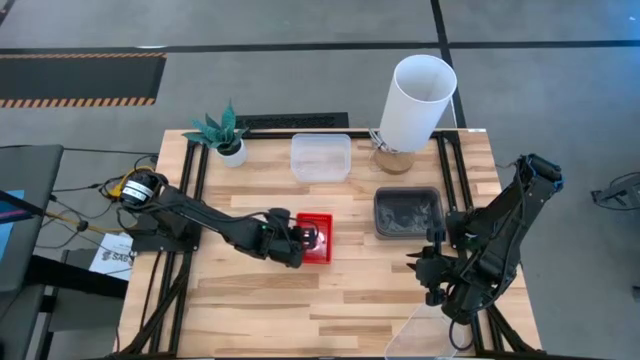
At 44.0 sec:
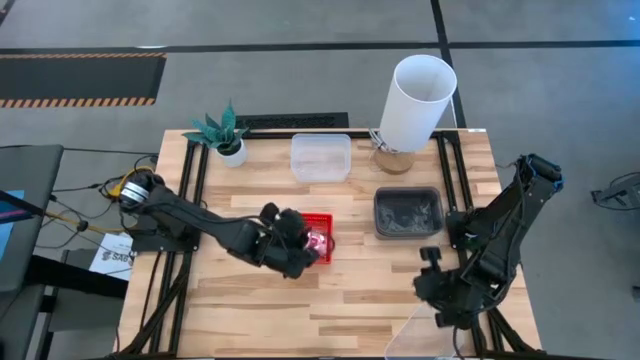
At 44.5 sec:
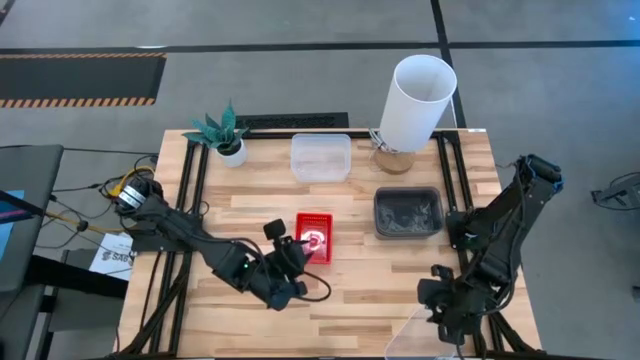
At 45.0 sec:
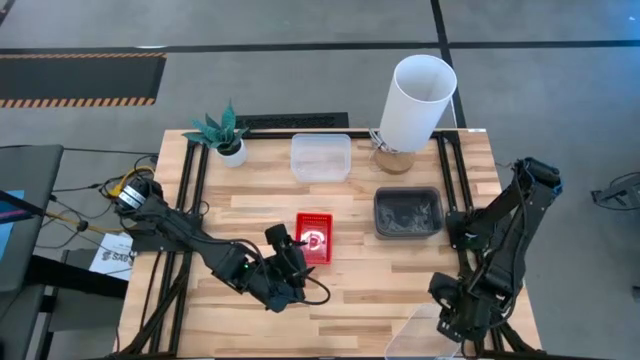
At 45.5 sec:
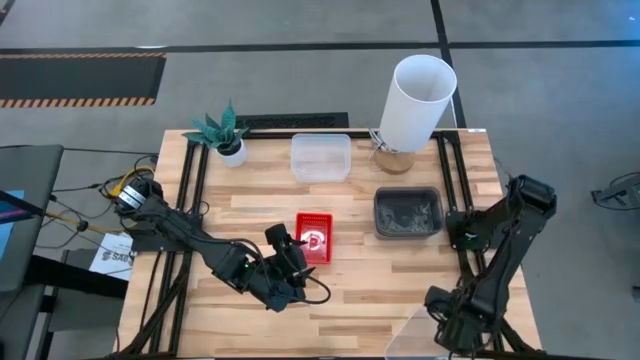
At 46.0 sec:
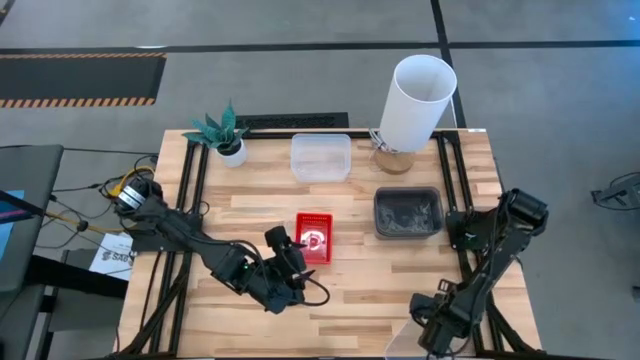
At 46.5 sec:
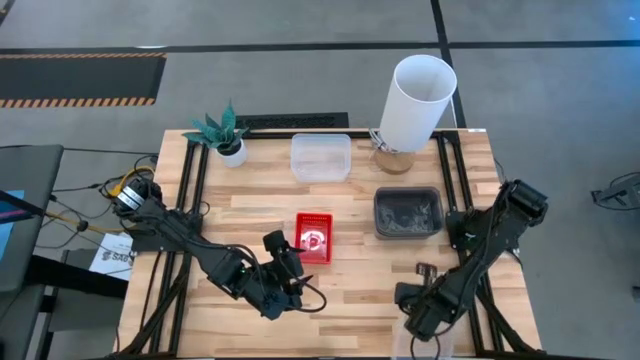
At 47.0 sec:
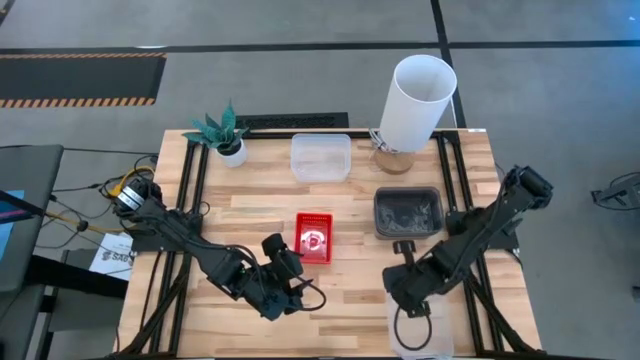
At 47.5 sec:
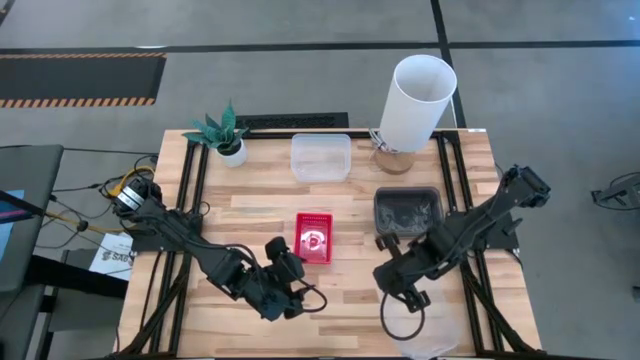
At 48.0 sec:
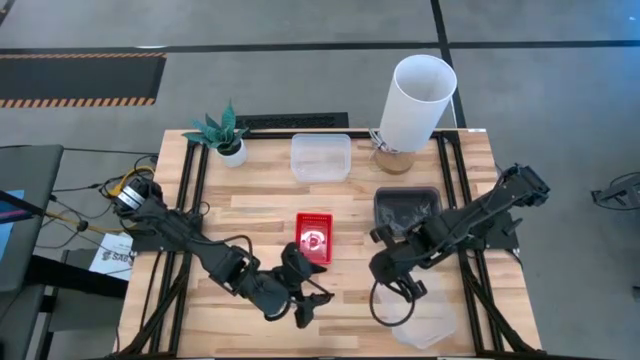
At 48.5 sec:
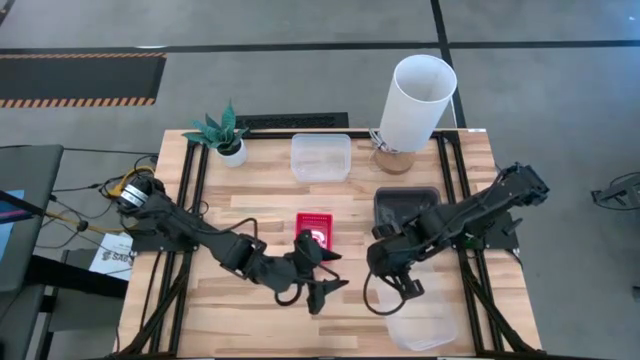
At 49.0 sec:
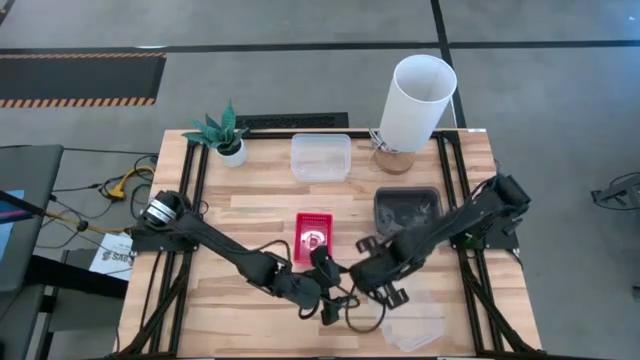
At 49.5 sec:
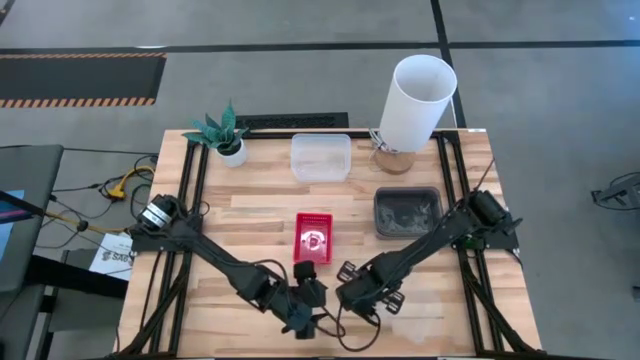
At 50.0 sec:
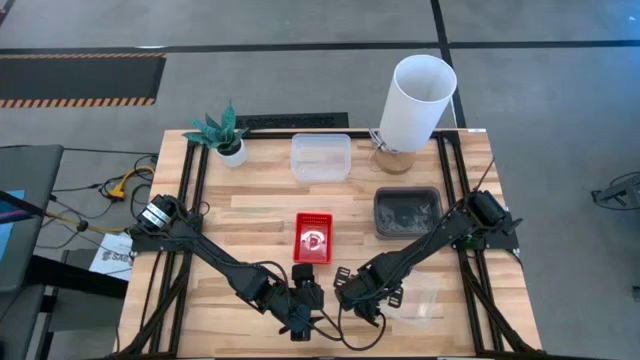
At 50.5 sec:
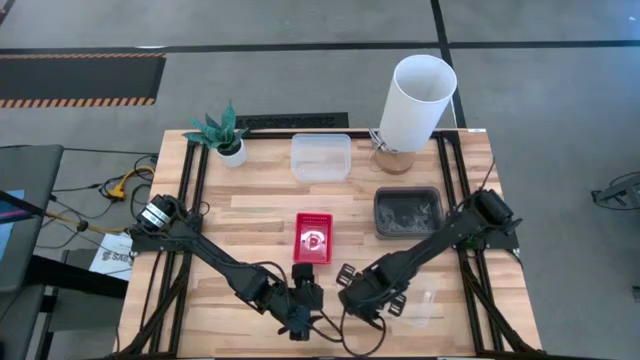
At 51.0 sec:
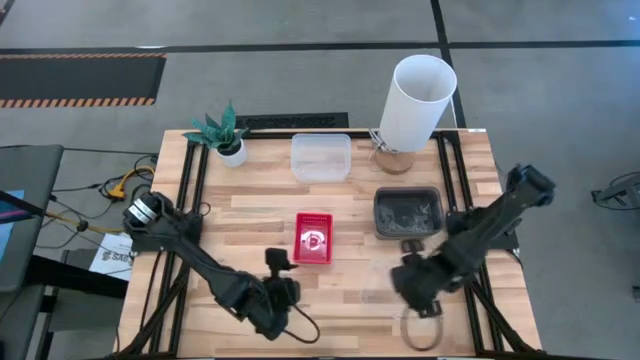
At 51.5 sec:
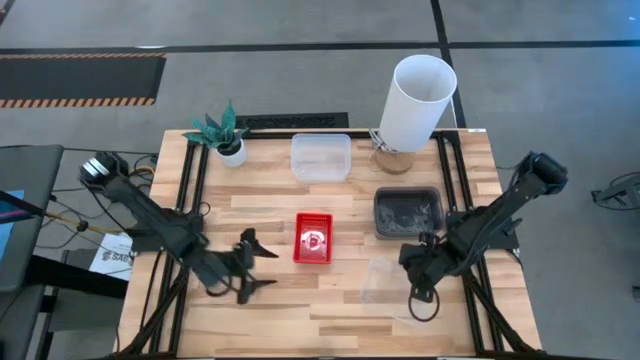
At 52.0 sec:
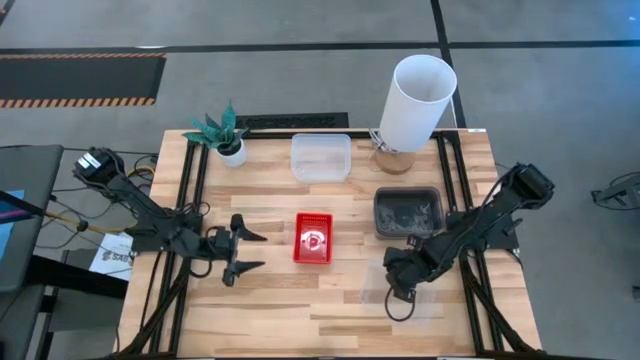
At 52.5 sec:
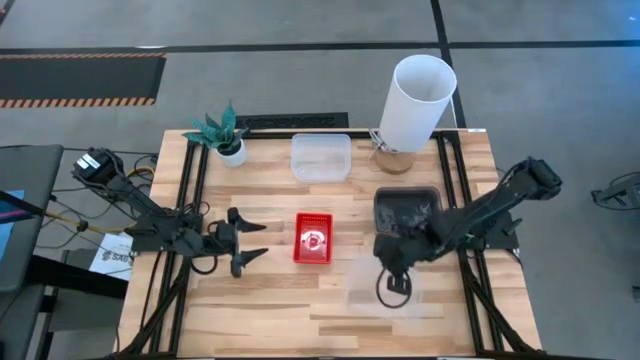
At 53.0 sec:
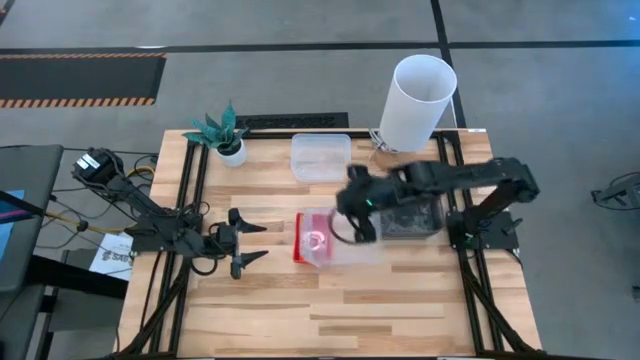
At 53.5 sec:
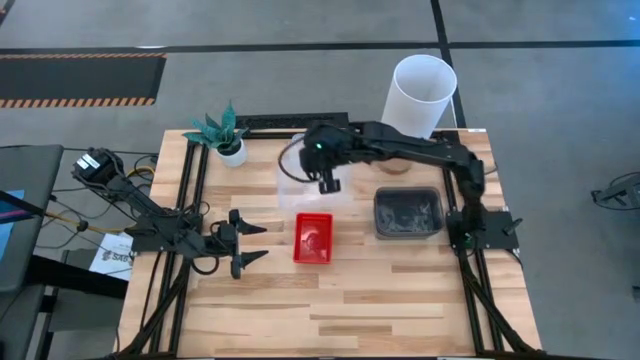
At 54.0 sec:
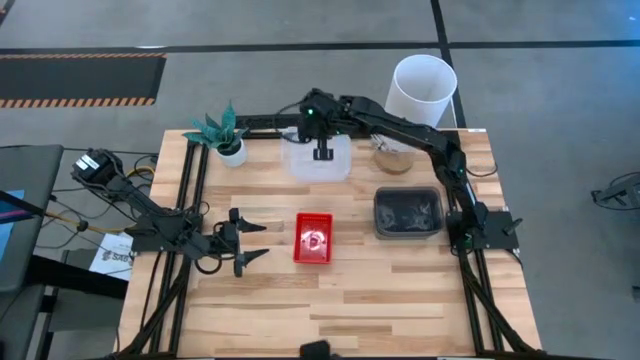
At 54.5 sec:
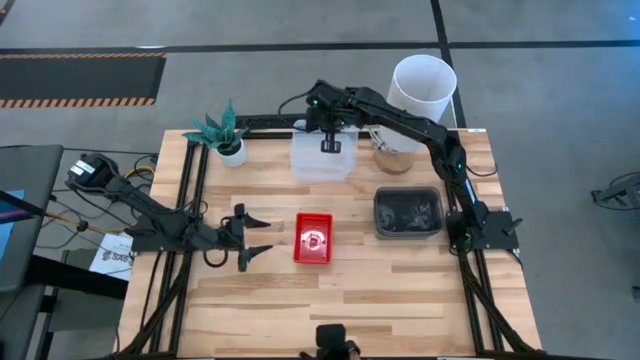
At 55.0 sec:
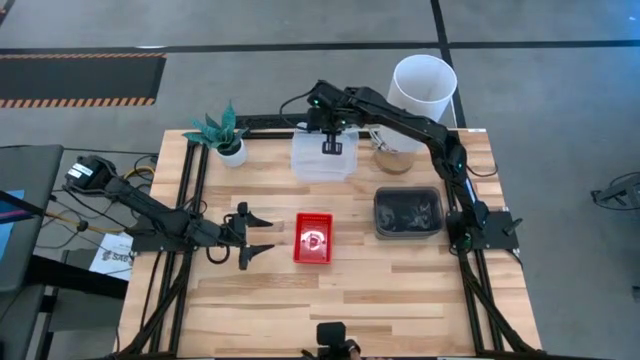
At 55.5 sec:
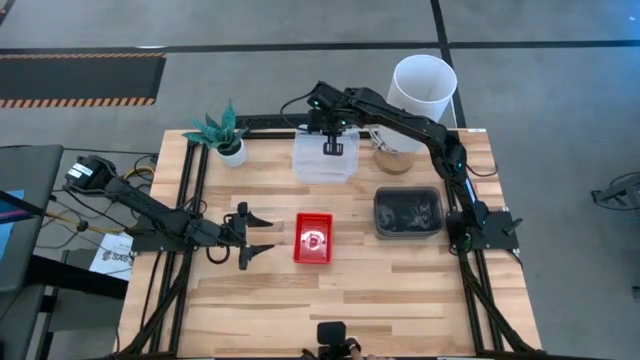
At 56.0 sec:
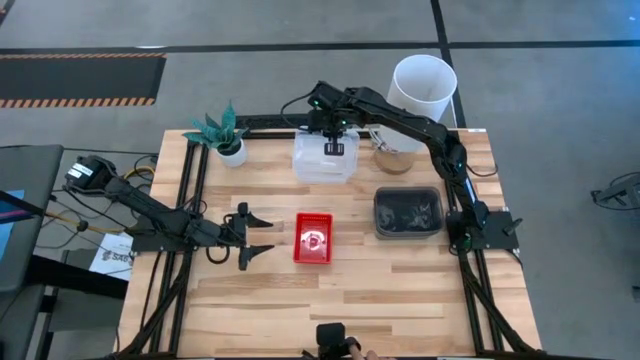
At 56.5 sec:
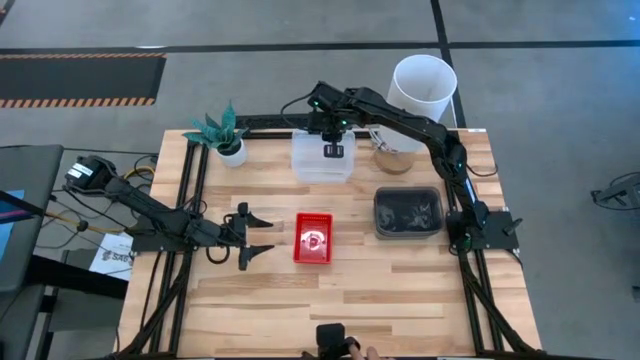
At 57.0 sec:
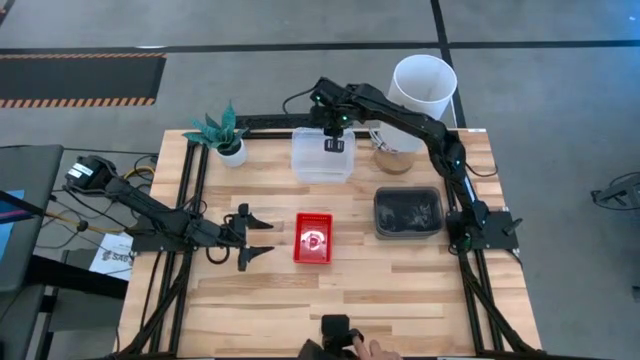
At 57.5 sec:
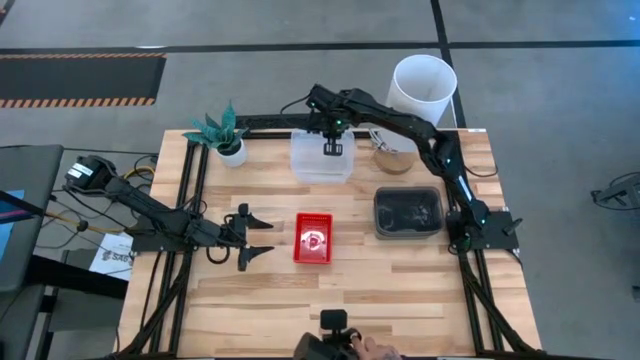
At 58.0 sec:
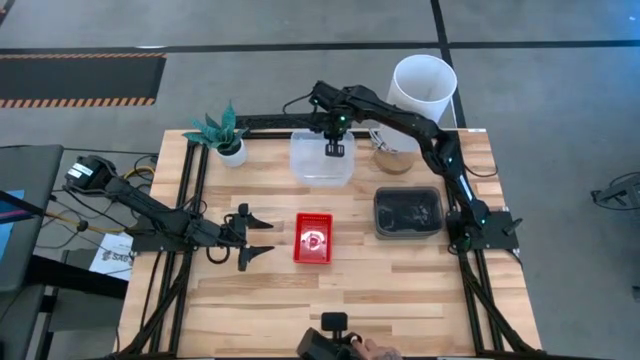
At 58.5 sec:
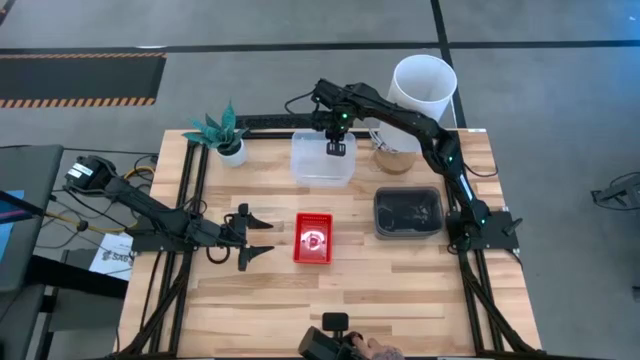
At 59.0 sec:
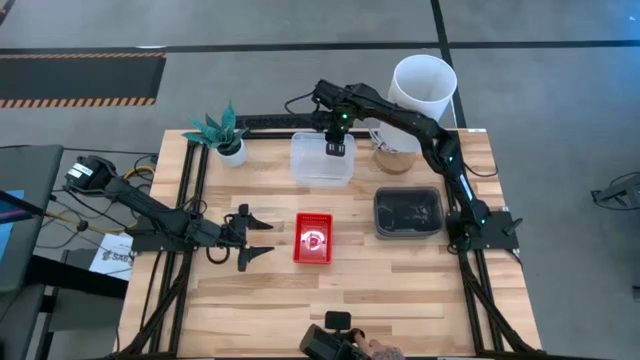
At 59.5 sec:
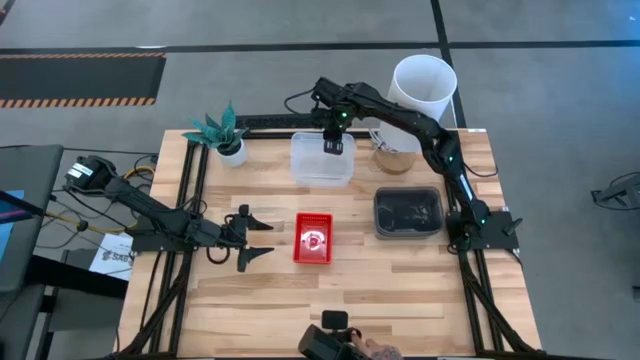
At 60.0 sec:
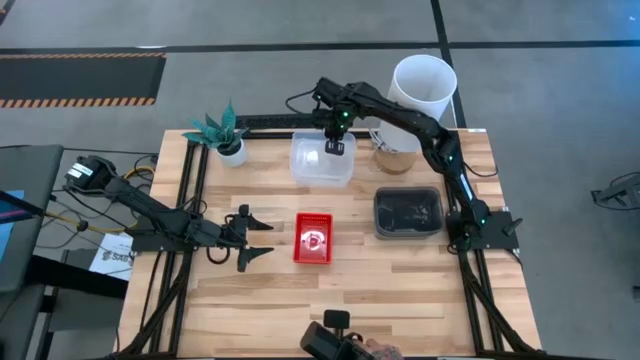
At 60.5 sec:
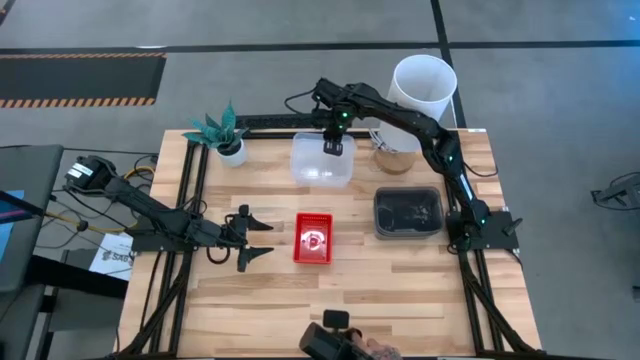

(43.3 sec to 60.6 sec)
Stack the bottom transparent bin on top of the top transparent stacked bins

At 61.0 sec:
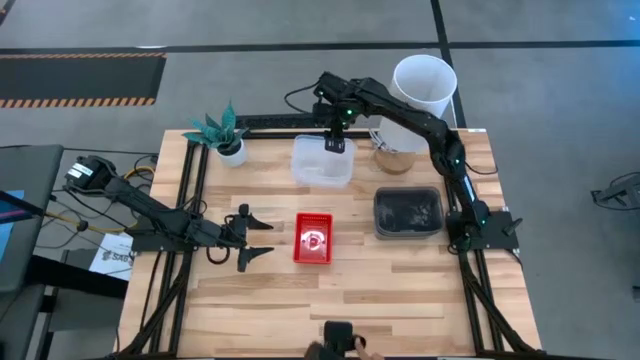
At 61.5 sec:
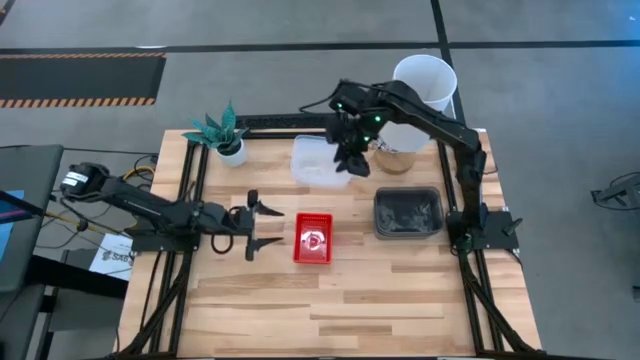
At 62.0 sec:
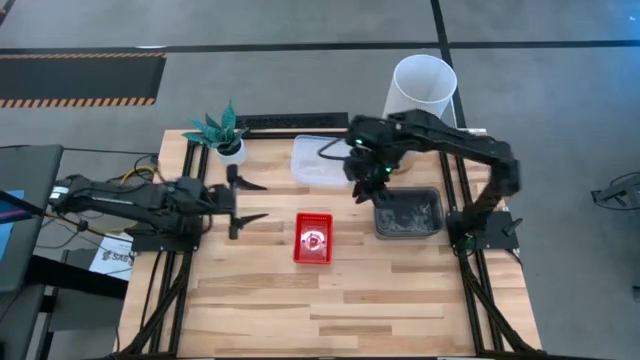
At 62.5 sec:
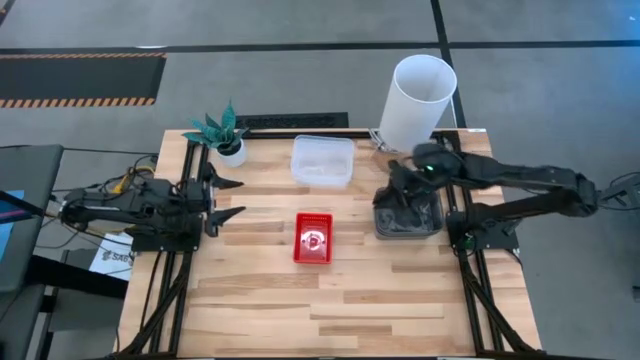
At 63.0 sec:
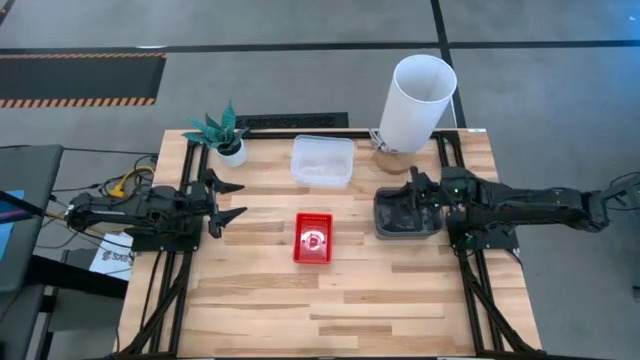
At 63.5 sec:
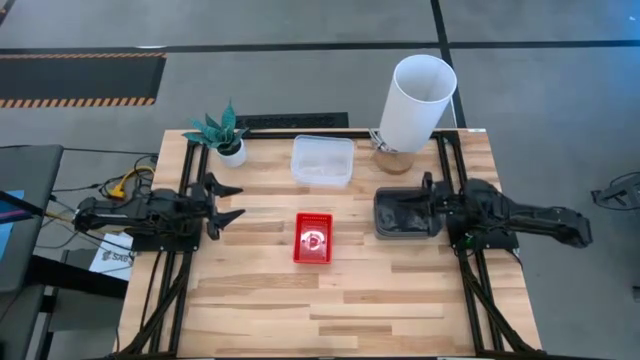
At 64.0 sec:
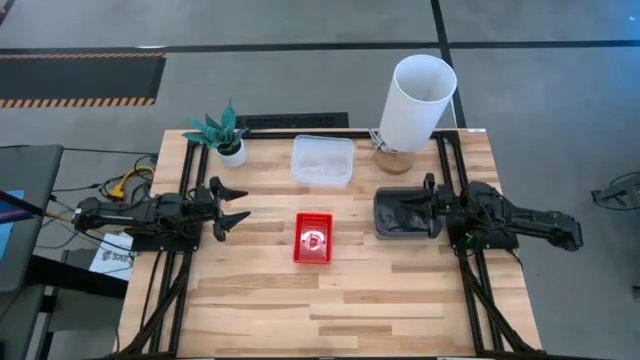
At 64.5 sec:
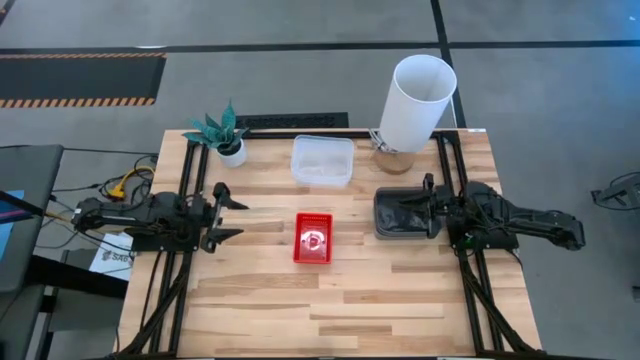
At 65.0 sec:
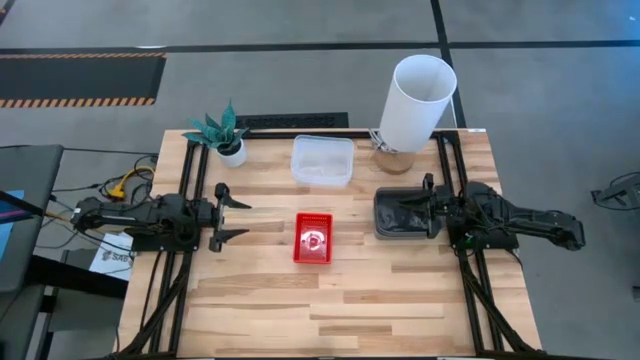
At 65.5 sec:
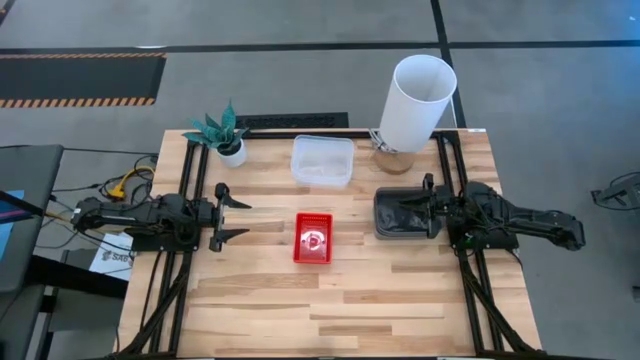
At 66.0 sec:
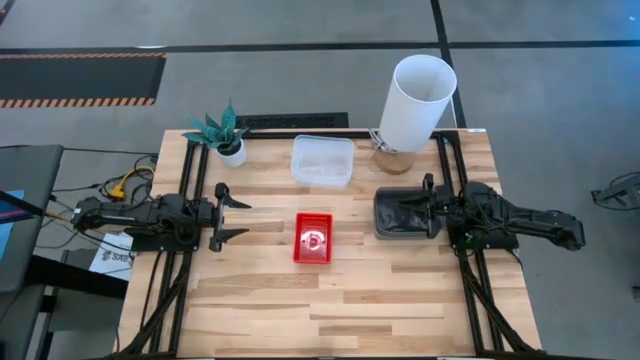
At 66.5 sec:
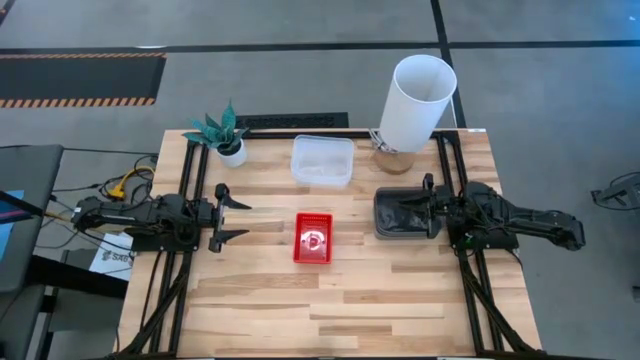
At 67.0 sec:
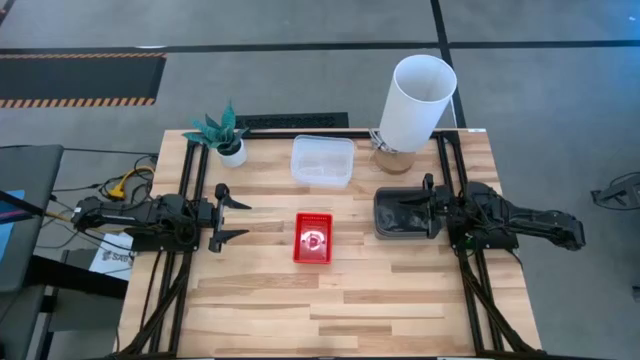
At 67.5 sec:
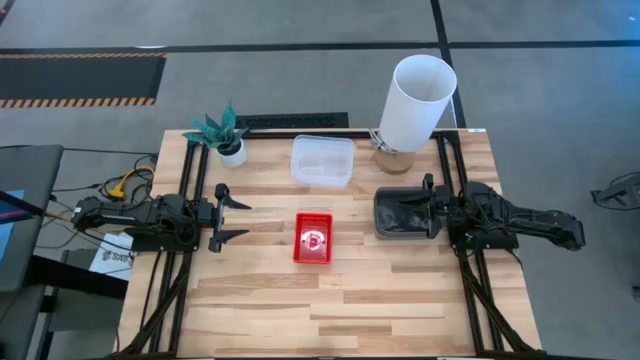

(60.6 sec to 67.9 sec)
Return to home position
